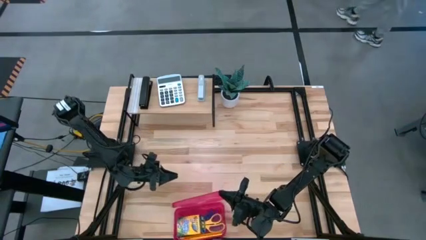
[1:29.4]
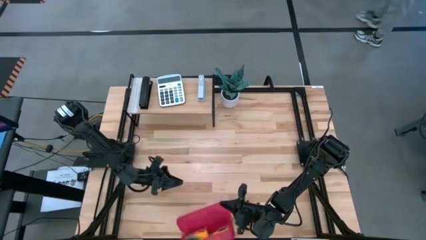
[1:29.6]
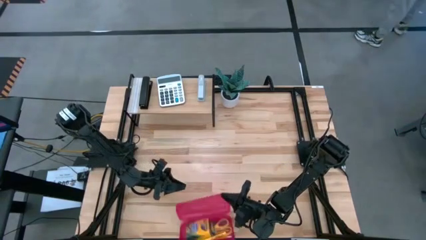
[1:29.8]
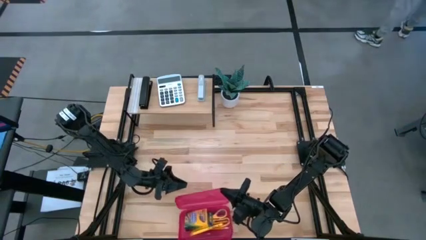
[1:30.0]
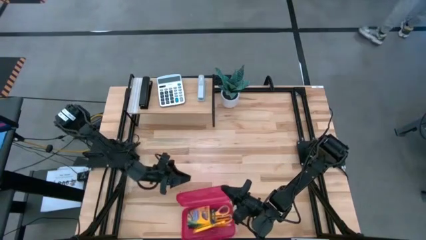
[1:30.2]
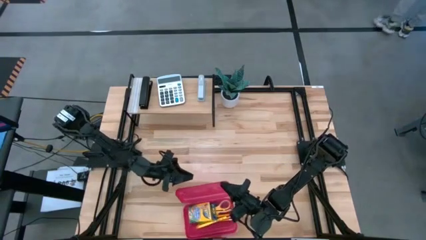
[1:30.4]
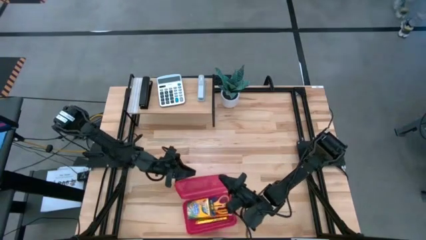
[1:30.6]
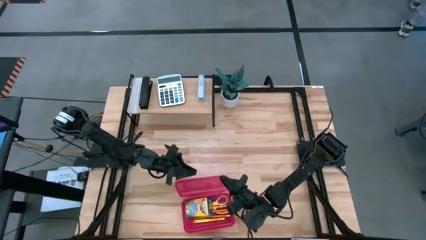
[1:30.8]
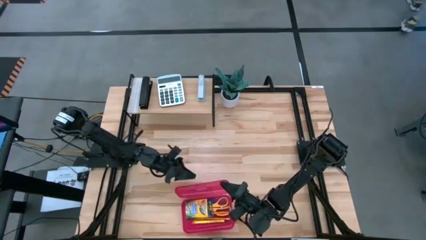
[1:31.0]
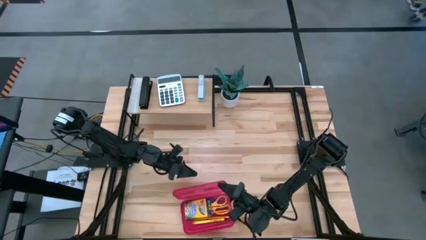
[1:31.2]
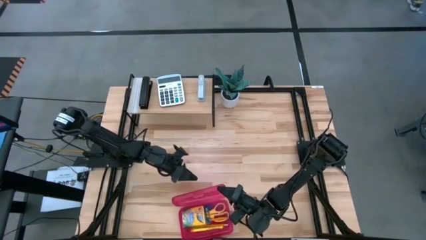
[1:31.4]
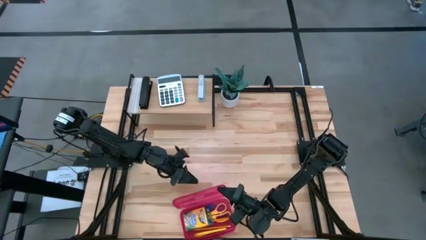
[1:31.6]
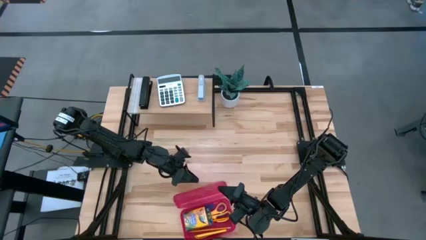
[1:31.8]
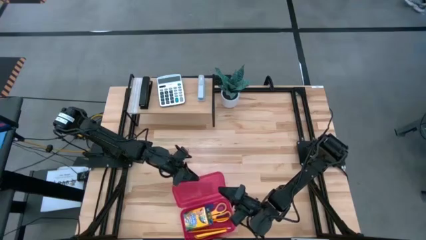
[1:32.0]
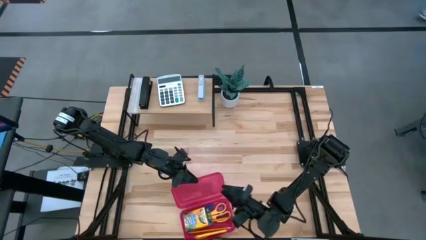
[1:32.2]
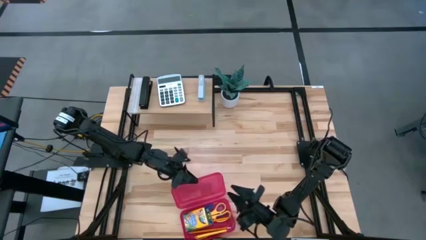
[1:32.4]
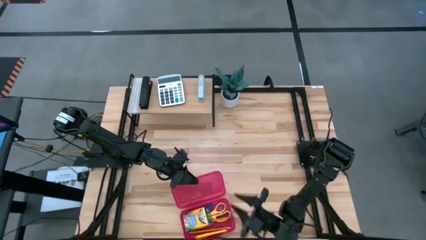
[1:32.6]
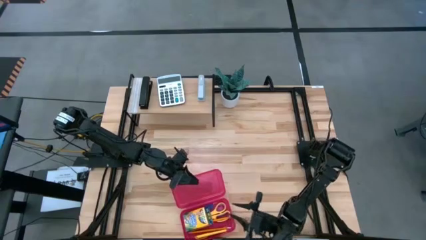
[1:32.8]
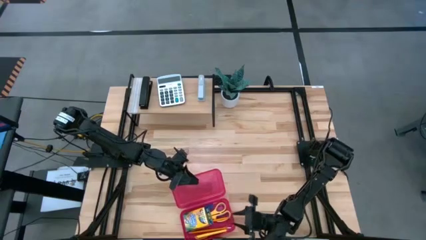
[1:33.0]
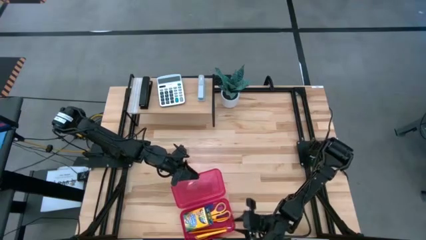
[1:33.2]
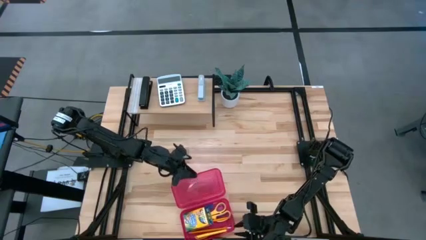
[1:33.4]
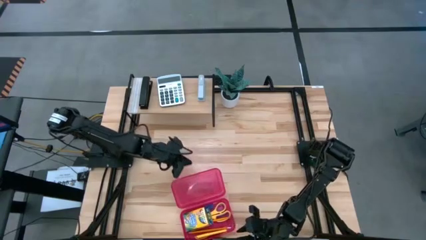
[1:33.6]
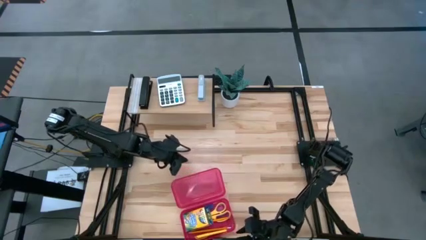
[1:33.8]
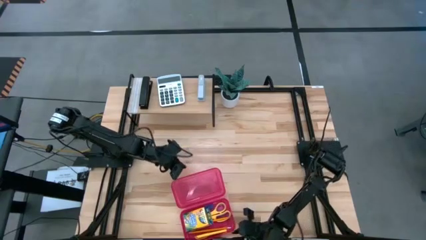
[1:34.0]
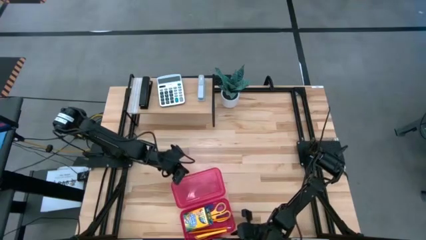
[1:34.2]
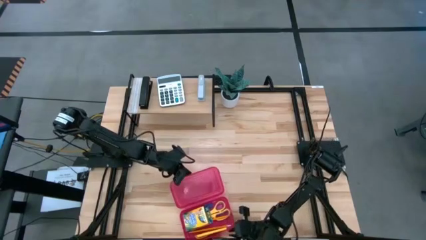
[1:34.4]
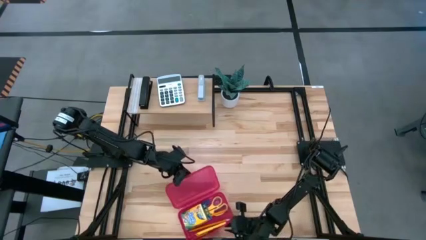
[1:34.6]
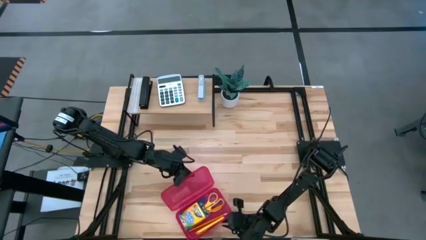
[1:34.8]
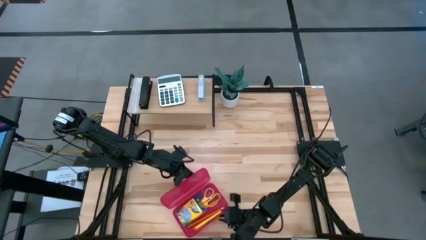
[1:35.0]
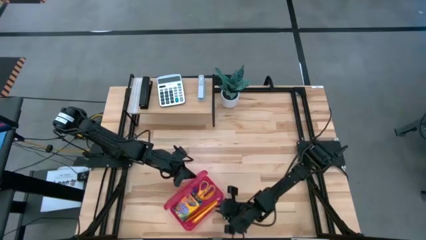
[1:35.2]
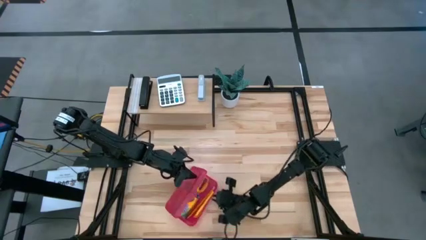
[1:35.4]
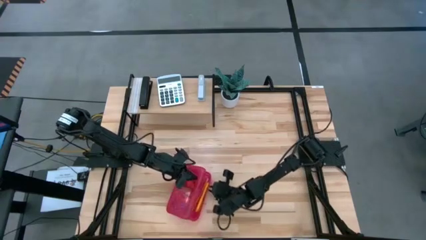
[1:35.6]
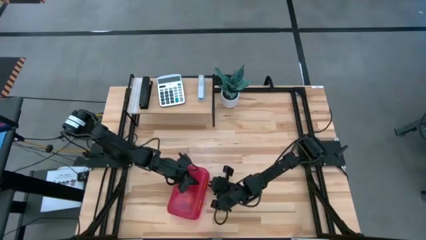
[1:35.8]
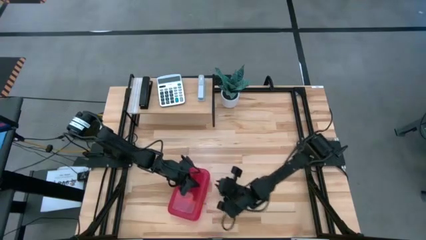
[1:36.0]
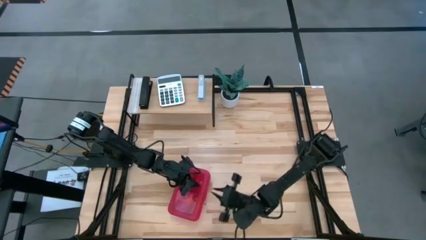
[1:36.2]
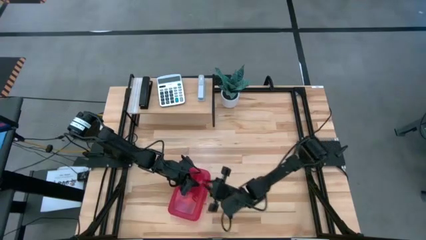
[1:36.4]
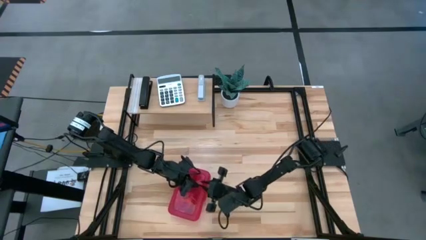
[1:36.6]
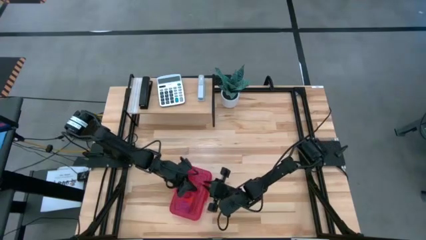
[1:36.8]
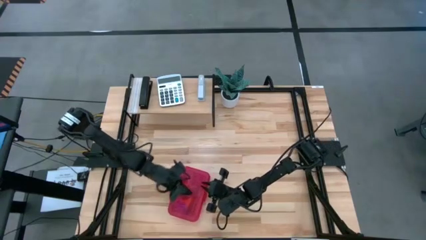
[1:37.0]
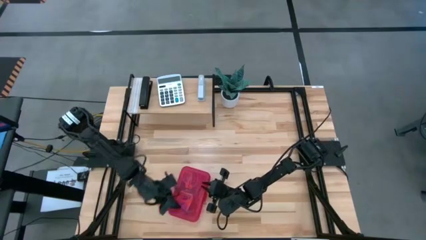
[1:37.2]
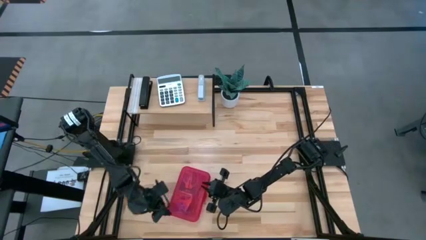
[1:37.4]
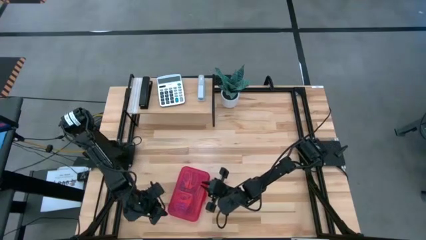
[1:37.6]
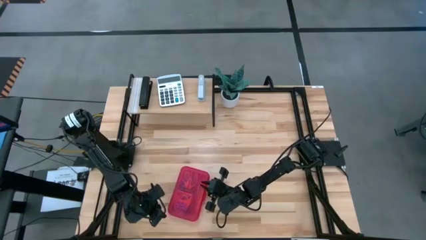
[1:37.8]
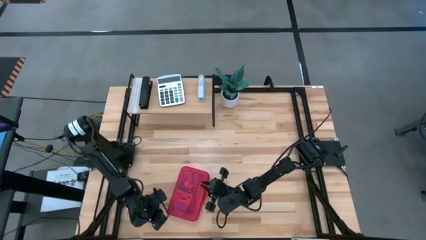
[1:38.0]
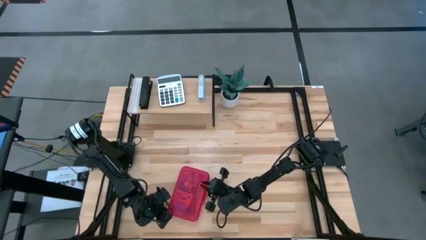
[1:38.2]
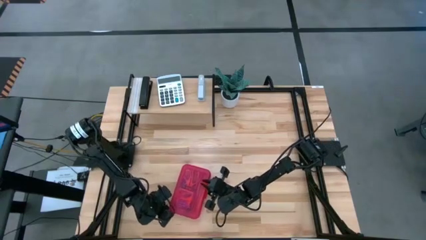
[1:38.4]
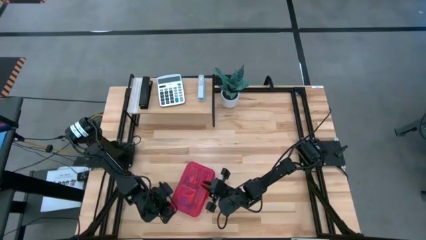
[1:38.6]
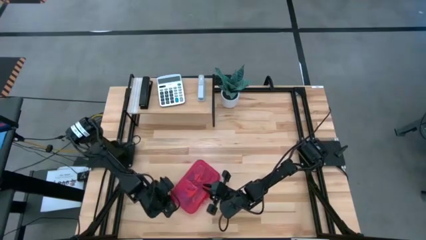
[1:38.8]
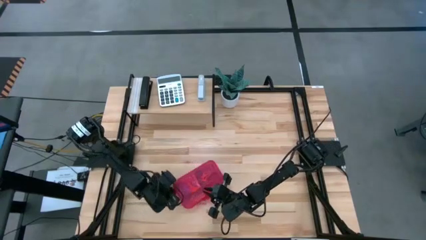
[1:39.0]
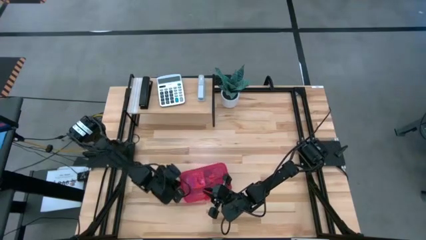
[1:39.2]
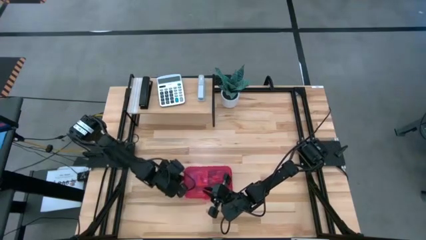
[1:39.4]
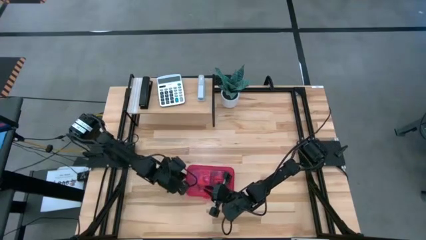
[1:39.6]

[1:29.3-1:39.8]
Task: Pack school essentials
Close the red supply box

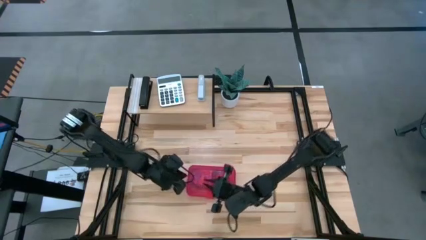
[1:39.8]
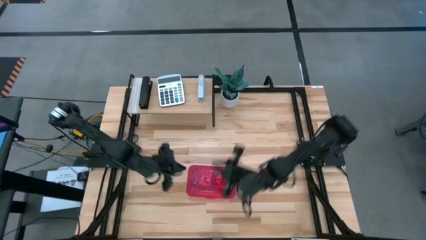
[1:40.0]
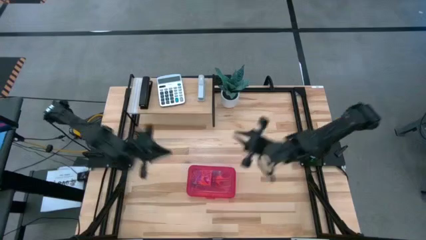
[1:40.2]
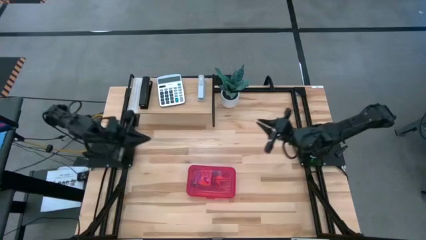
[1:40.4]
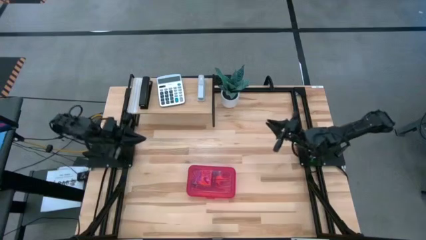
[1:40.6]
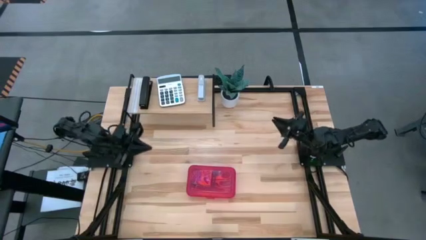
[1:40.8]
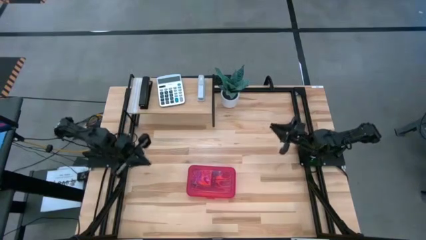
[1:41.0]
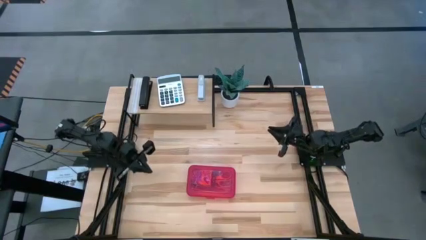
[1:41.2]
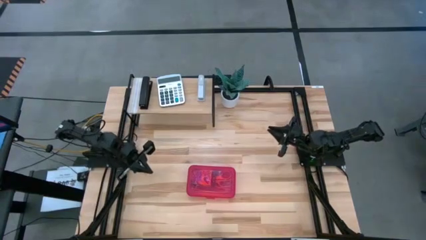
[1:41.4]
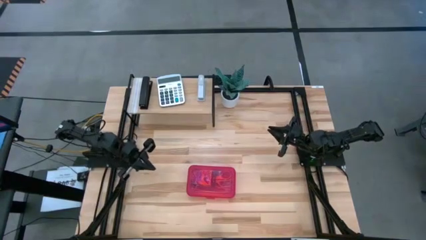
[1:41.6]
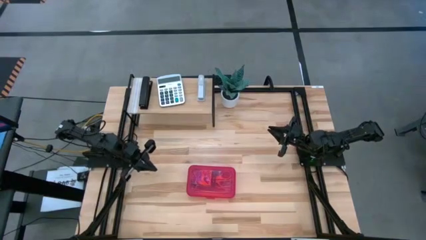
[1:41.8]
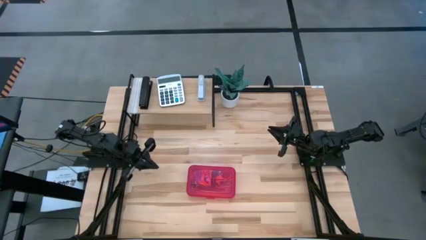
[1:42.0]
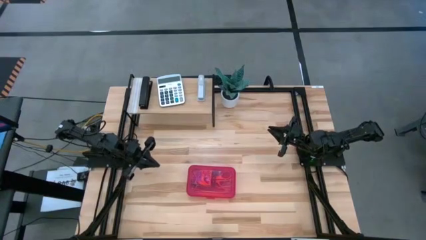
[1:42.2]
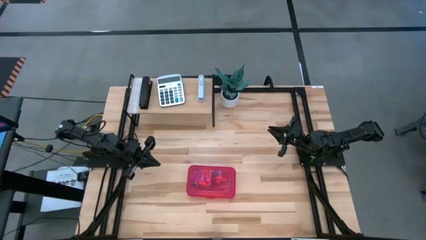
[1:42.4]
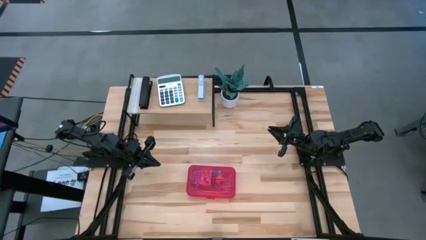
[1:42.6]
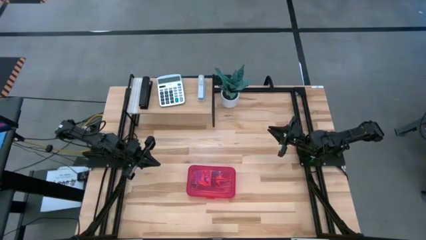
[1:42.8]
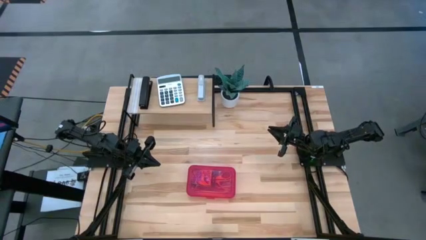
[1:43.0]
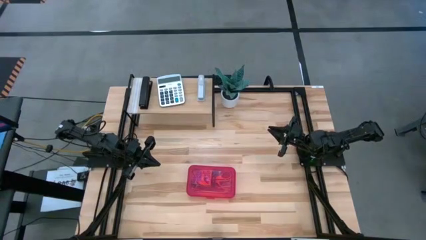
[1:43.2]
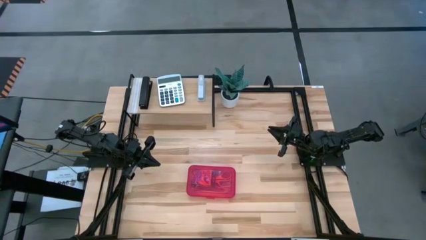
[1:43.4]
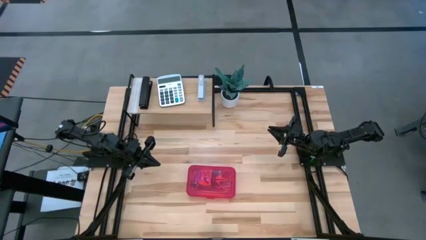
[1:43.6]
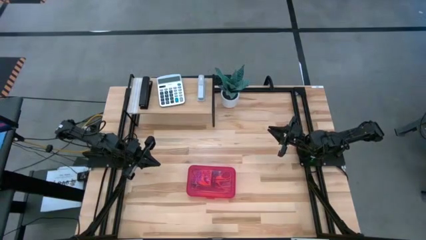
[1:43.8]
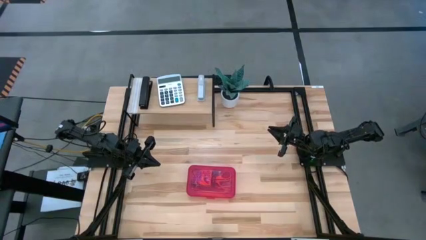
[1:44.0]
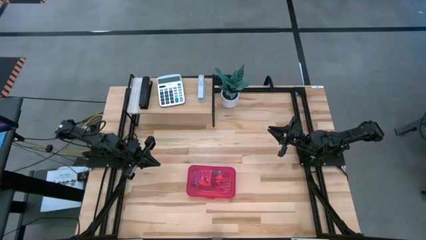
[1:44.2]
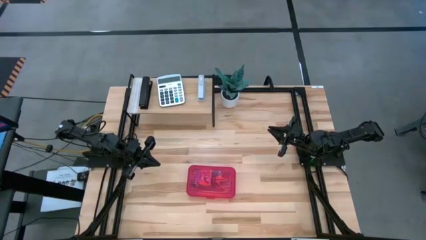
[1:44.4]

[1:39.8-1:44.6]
Return to Home Position
